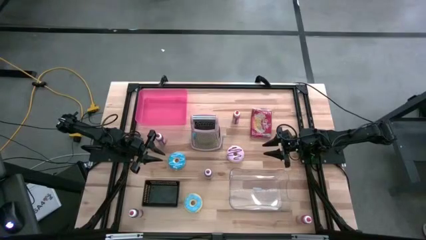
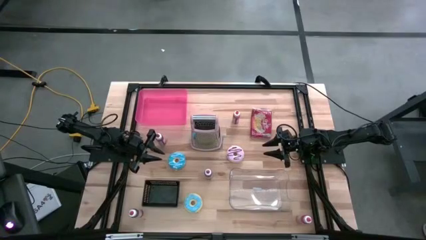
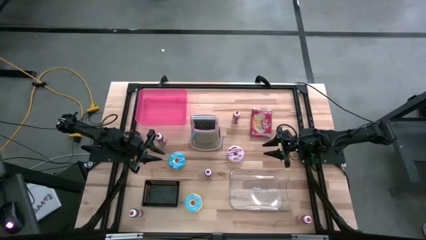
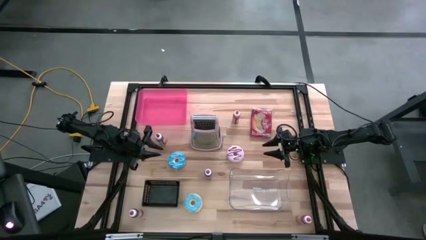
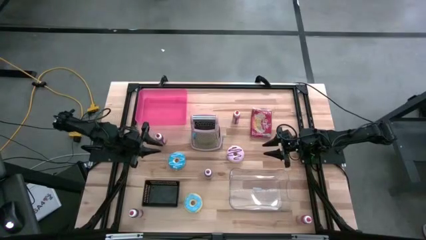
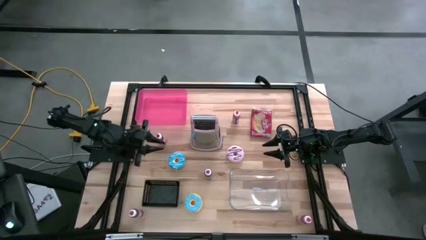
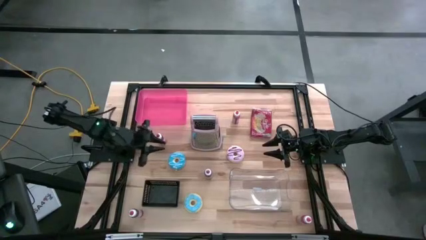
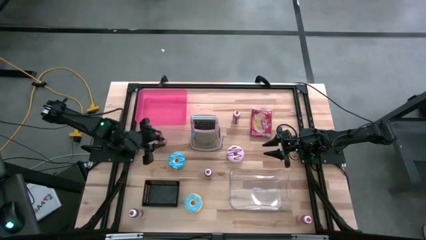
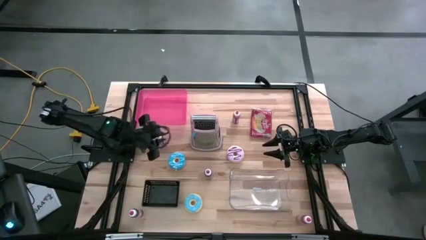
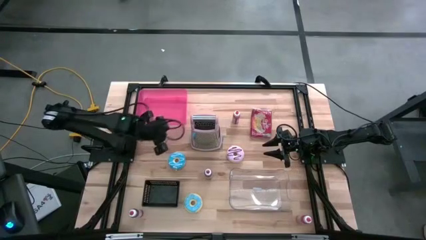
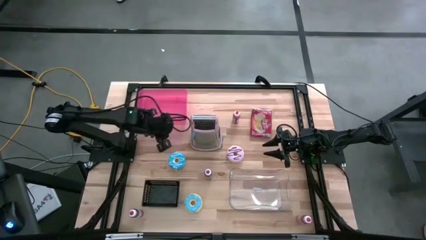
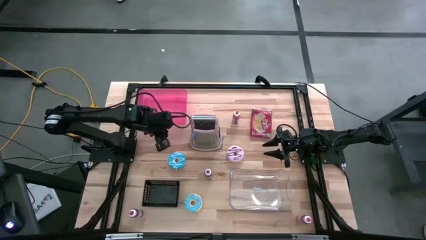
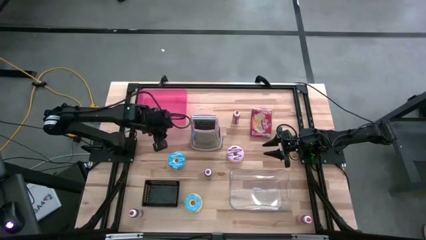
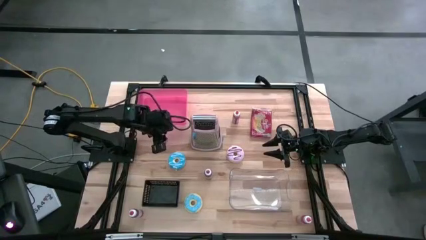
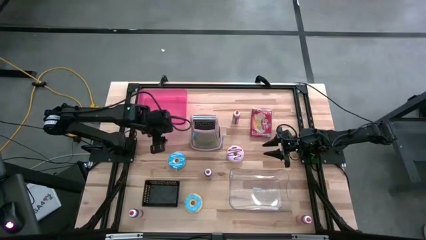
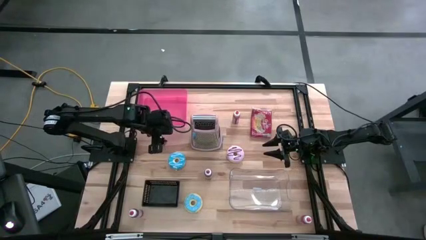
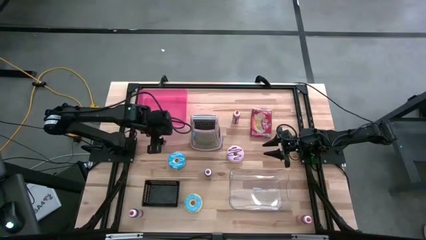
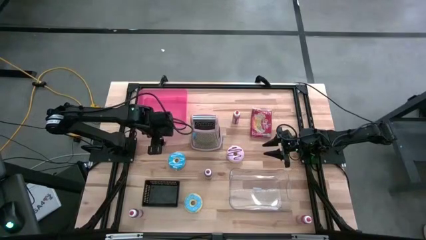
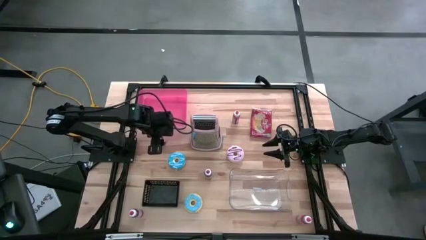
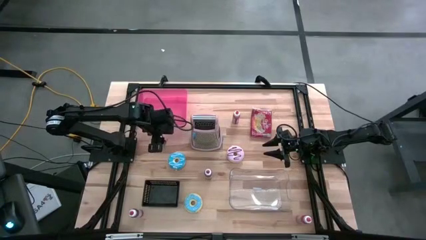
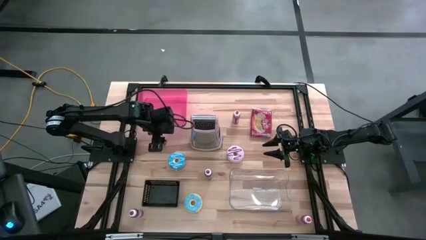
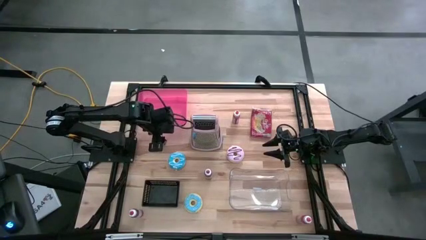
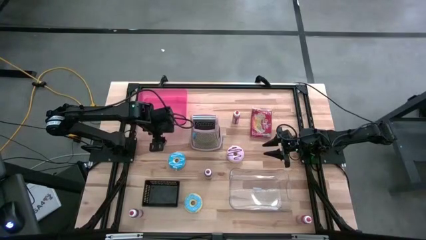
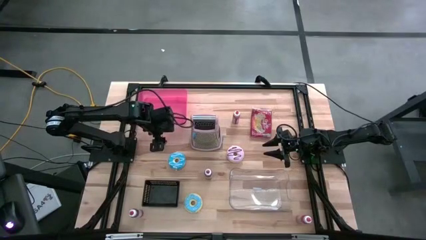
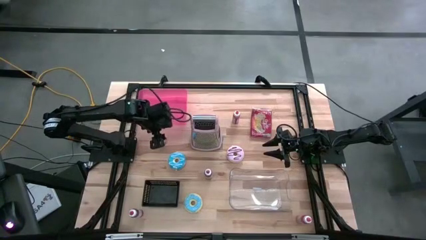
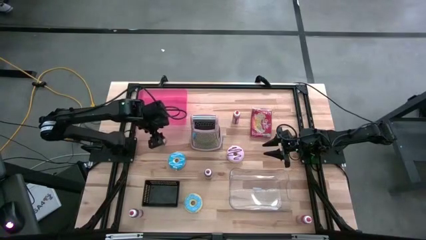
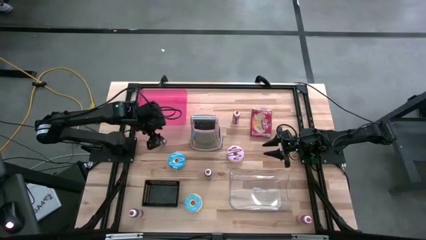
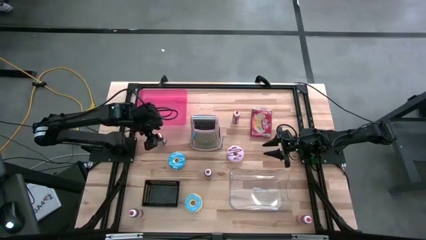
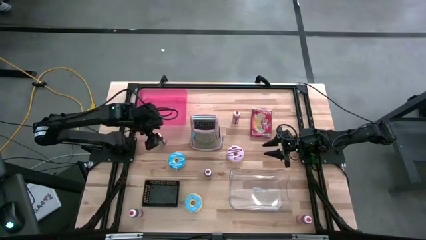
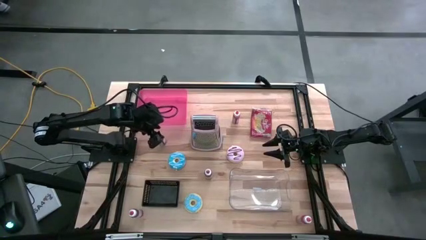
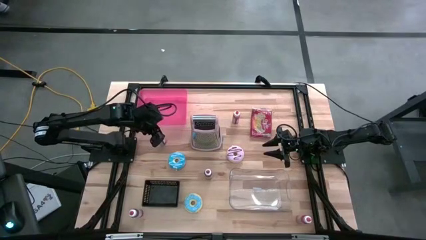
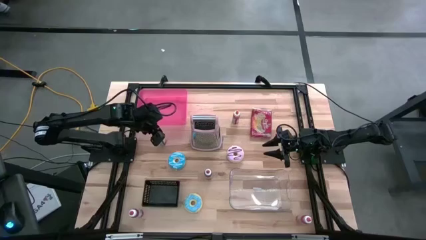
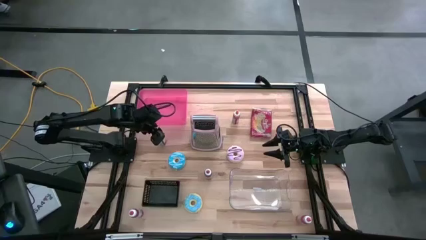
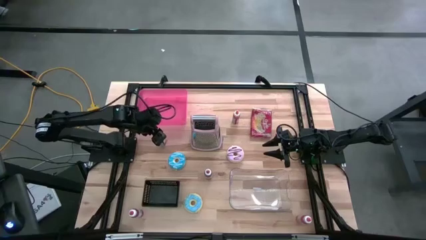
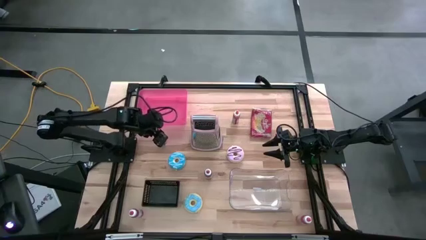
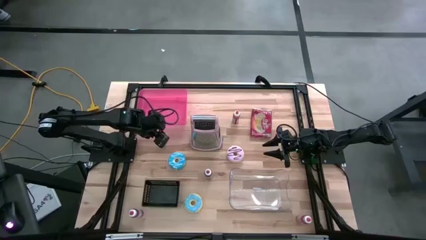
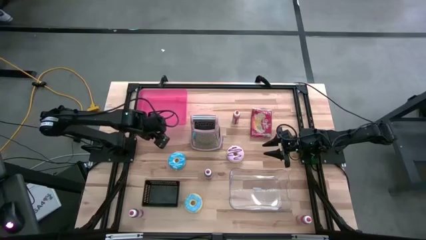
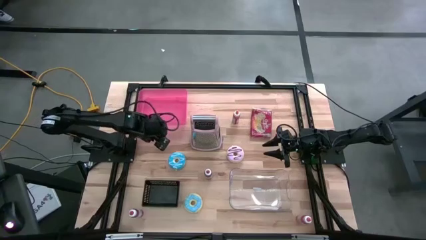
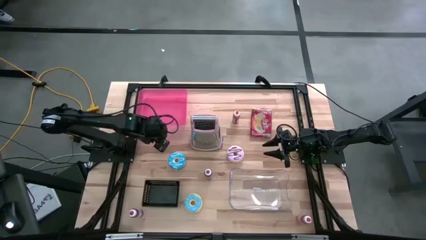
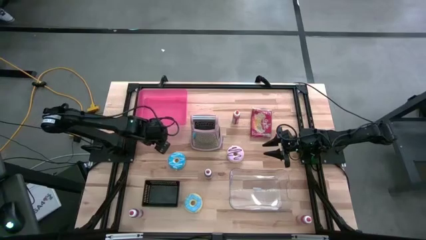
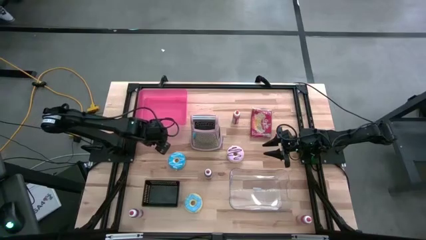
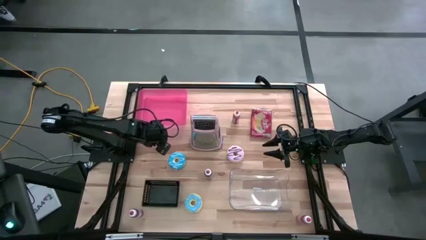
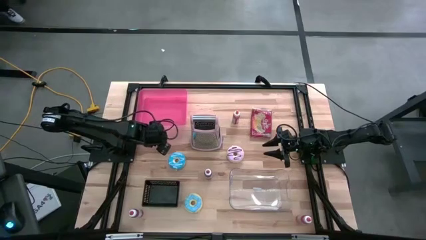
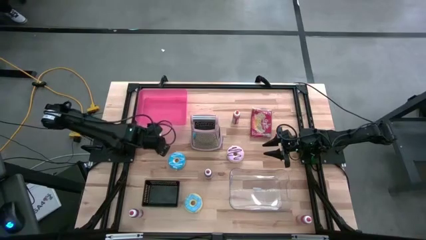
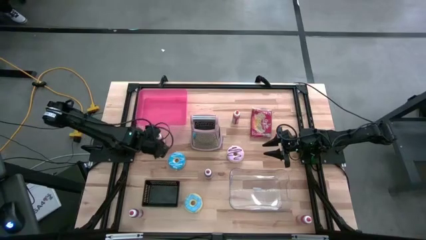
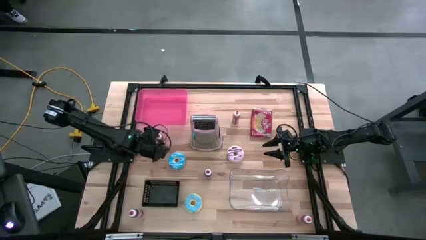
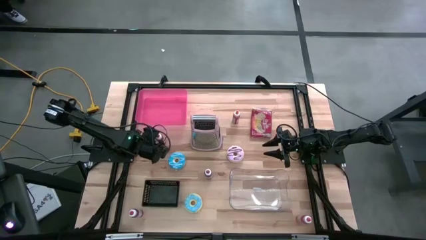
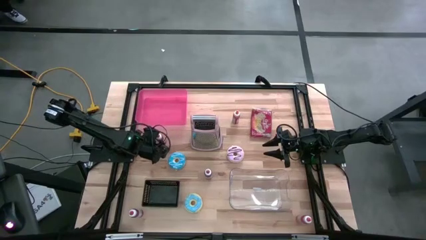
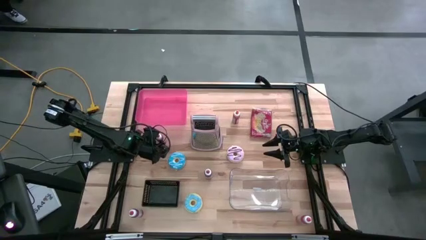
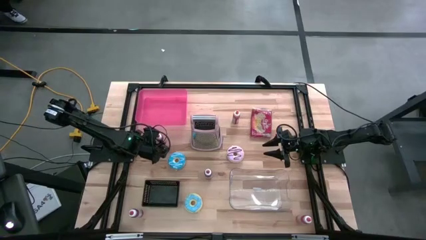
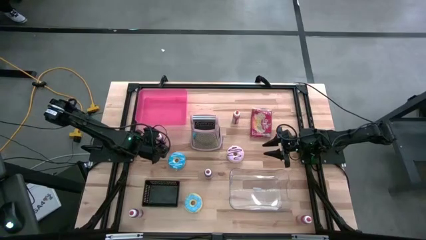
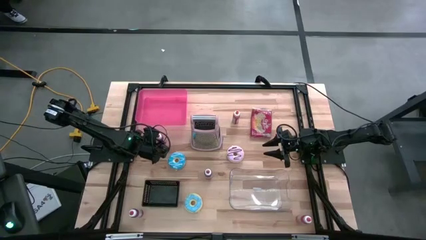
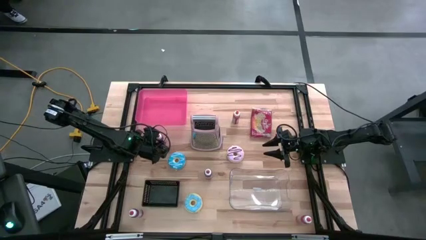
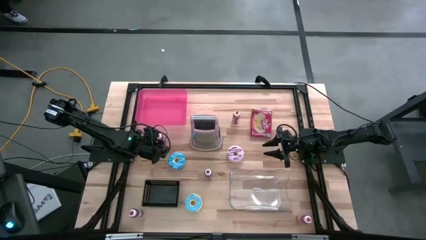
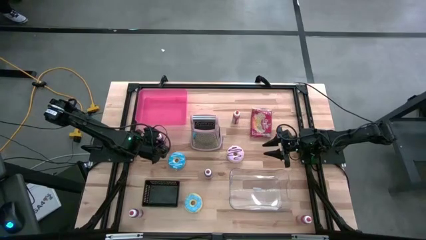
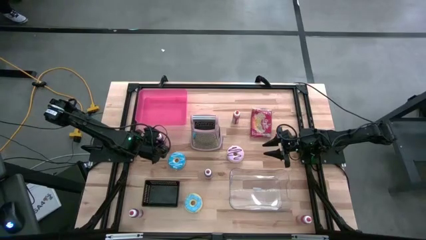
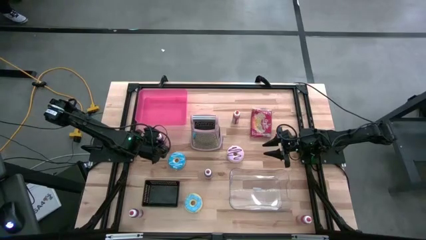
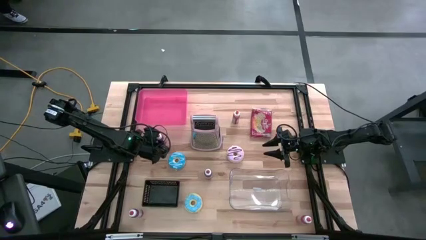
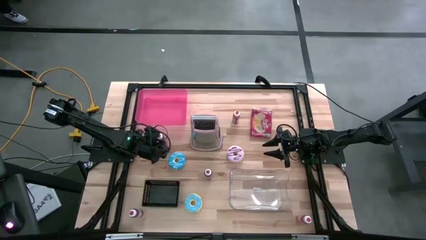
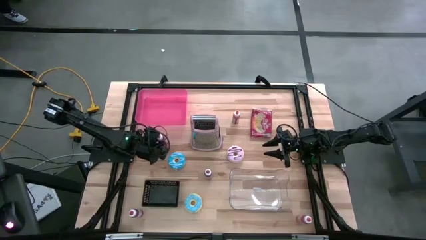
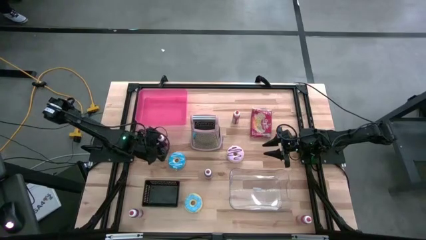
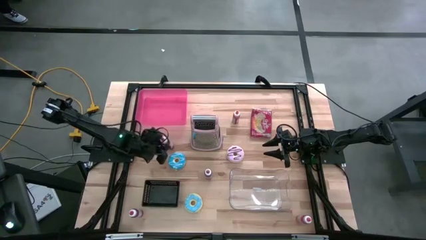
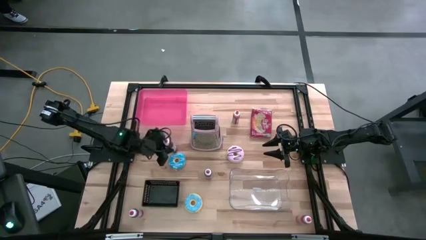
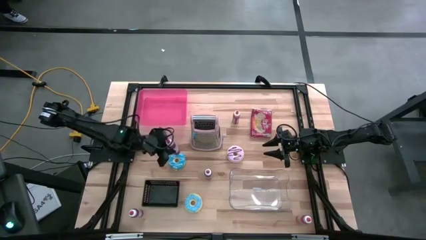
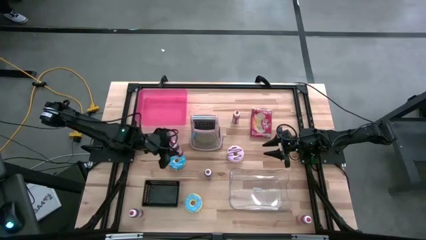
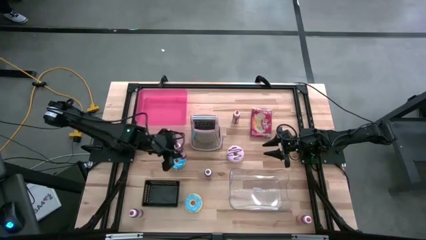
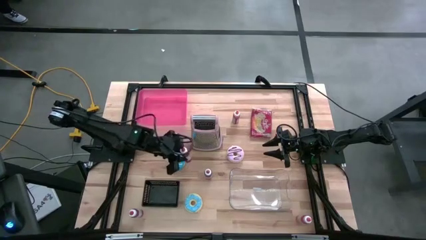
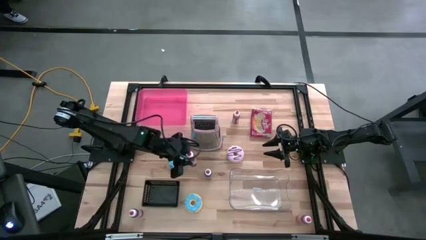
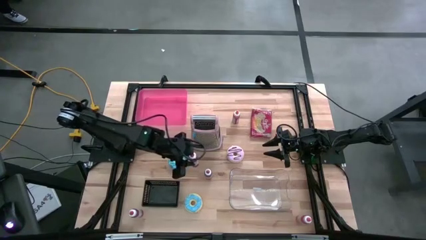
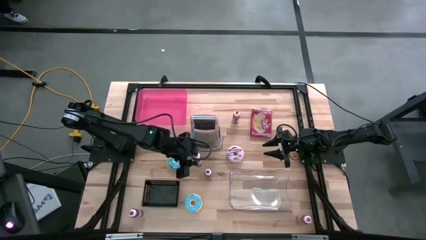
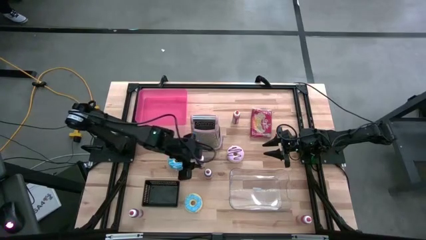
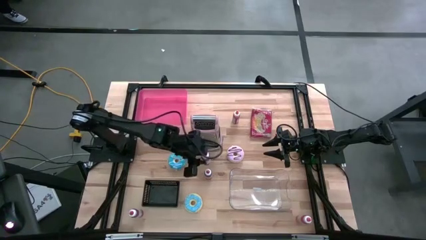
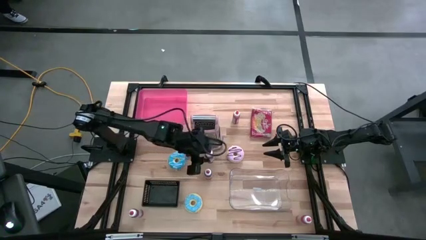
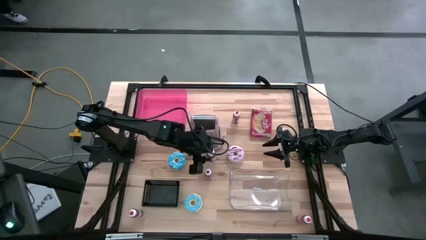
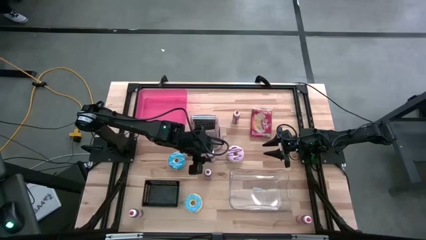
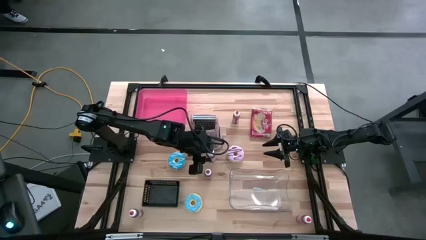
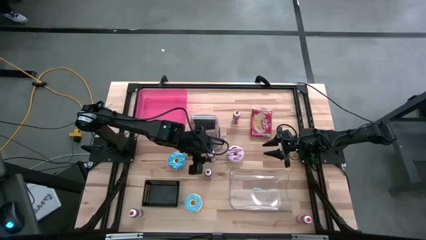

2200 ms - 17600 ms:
Task: Pick & Place Food Item
Put the top red food coloring bottle into the transparent bin
